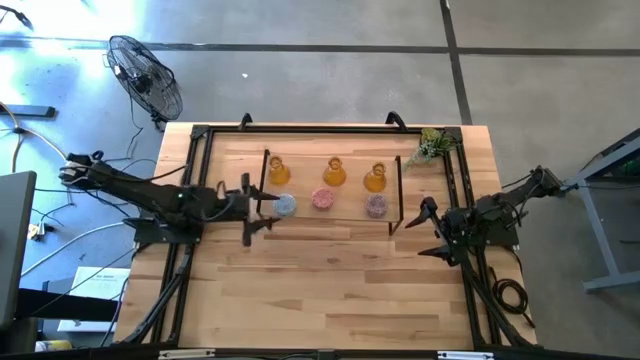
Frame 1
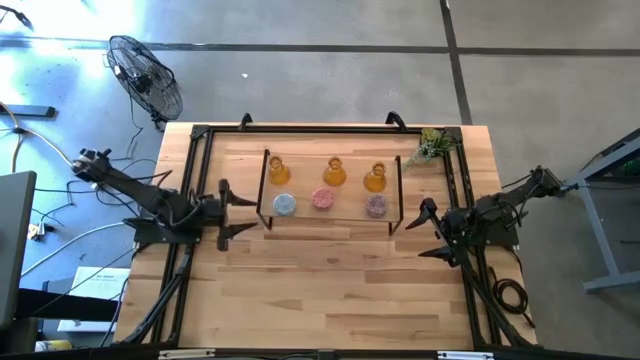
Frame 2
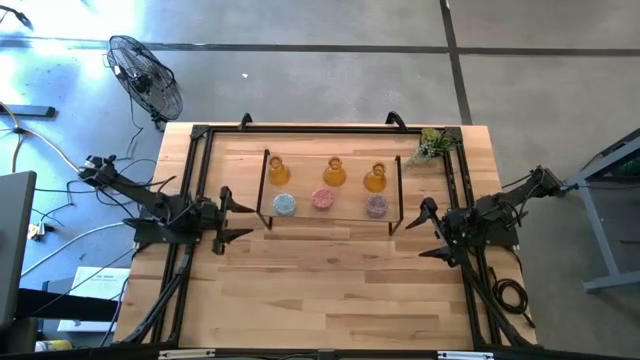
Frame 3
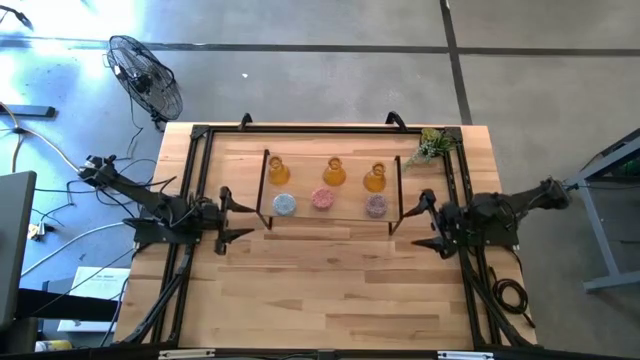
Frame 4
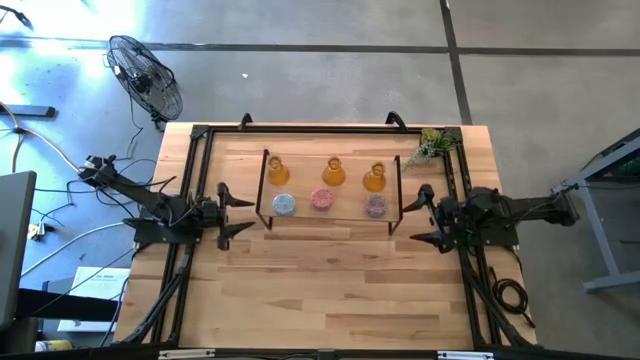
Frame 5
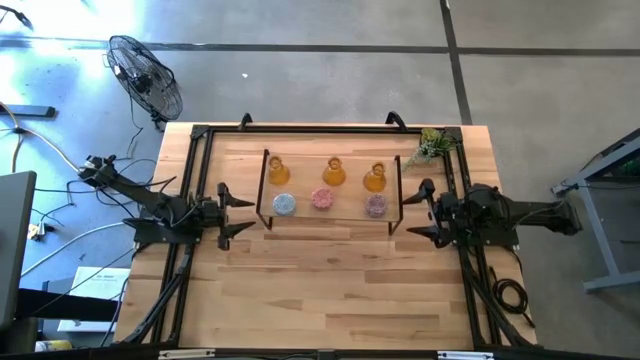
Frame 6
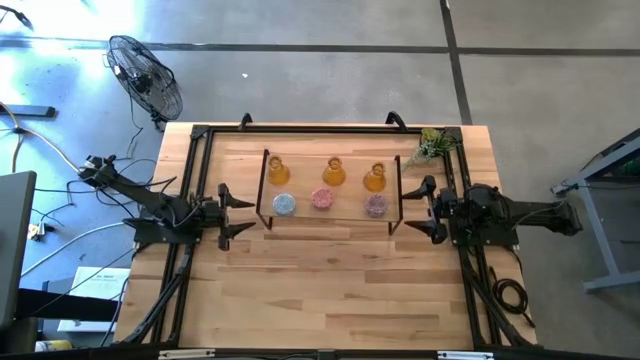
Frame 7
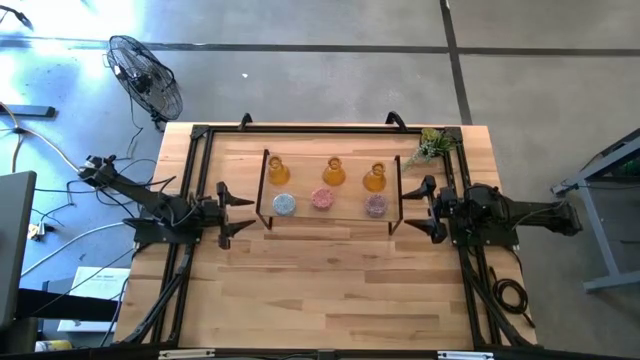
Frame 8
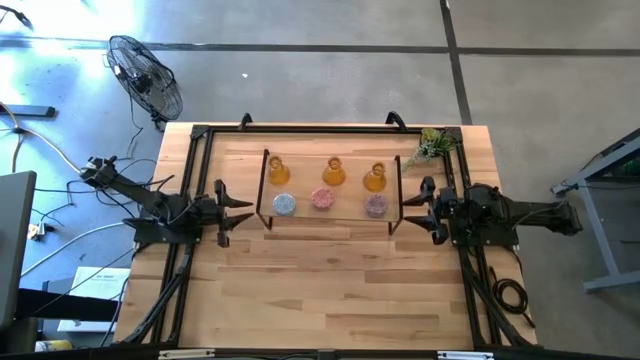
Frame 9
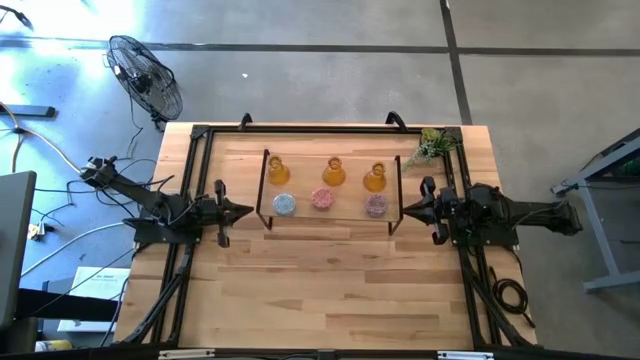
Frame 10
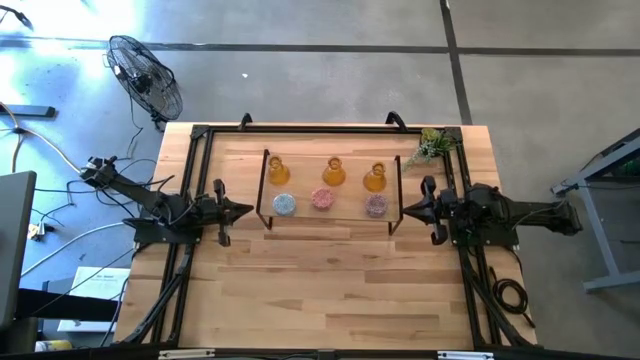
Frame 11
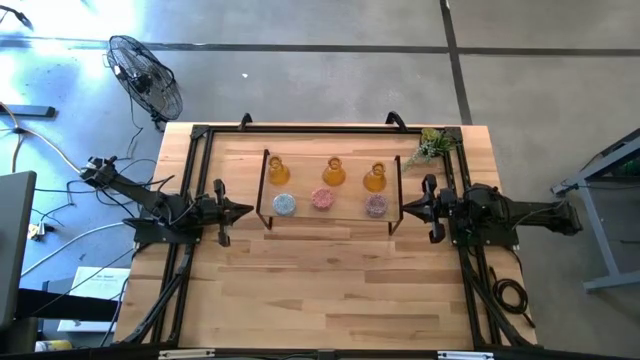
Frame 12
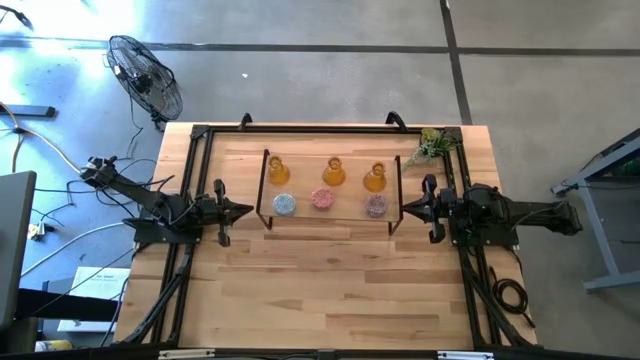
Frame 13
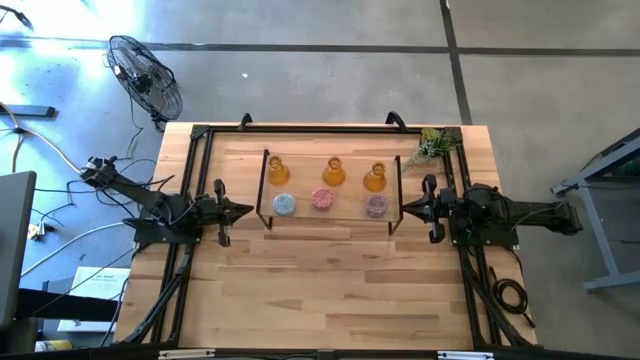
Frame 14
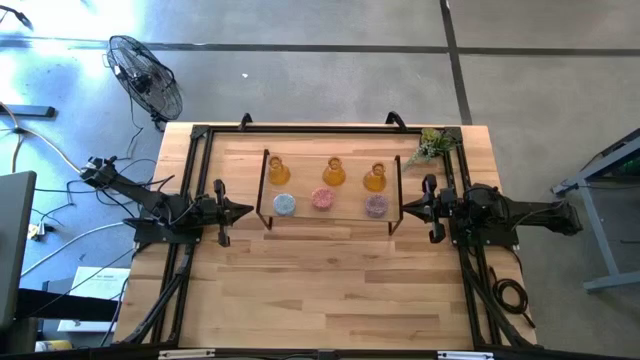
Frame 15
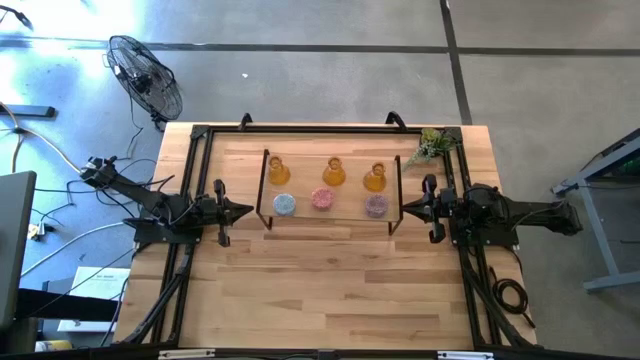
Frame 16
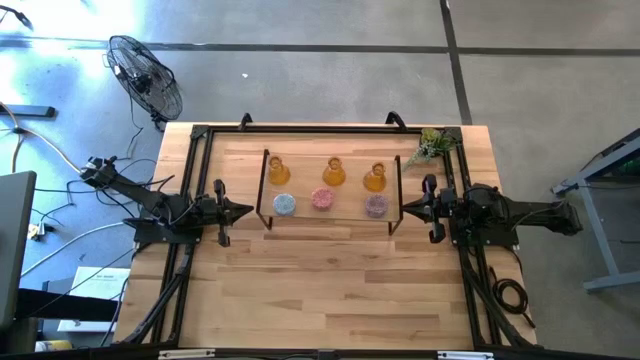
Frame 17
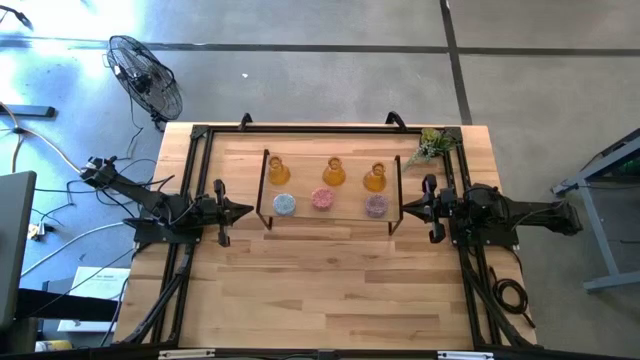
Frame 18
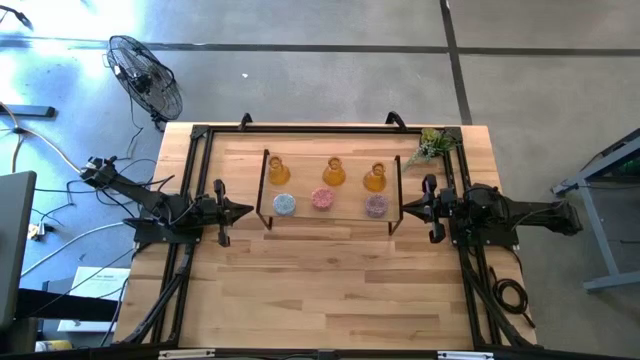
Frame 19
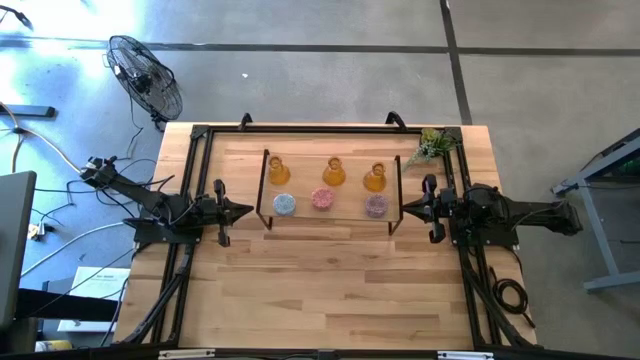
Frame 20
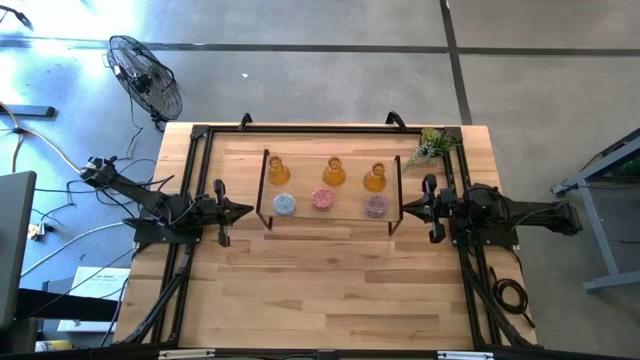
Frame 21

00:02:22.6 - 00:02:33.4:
Task: Pick & Place candle stick holders
Return to Home Position

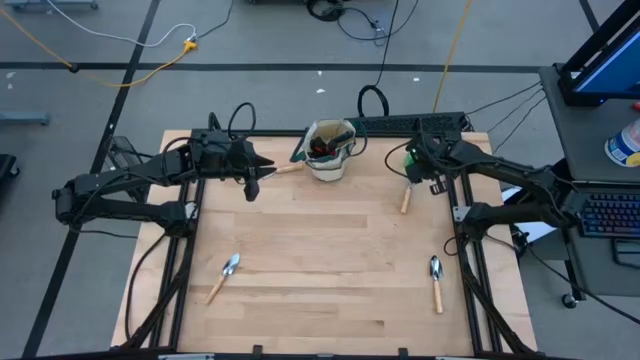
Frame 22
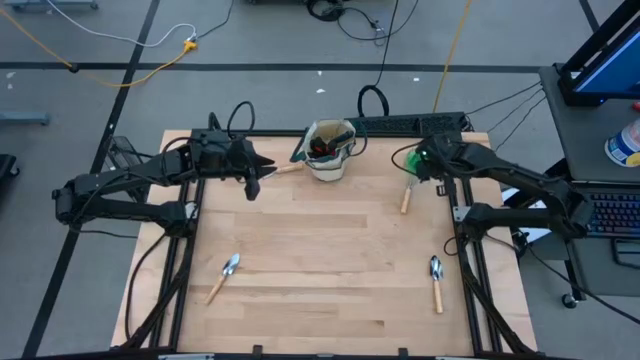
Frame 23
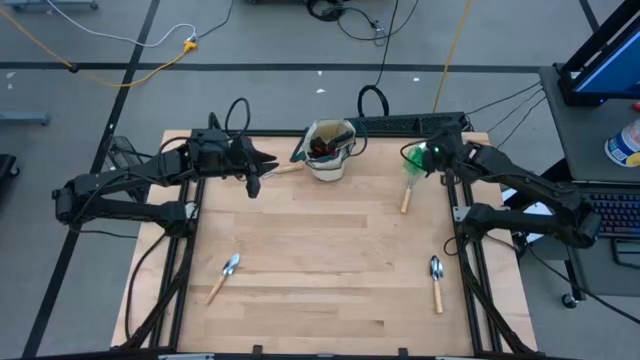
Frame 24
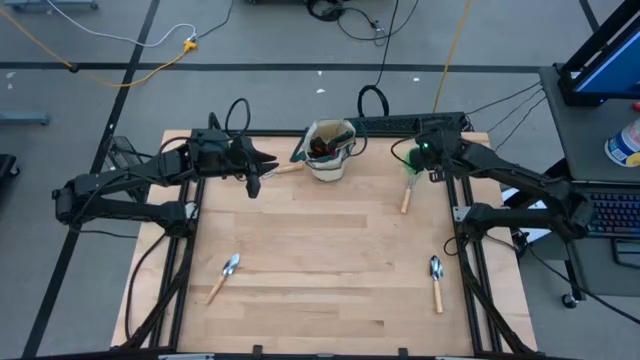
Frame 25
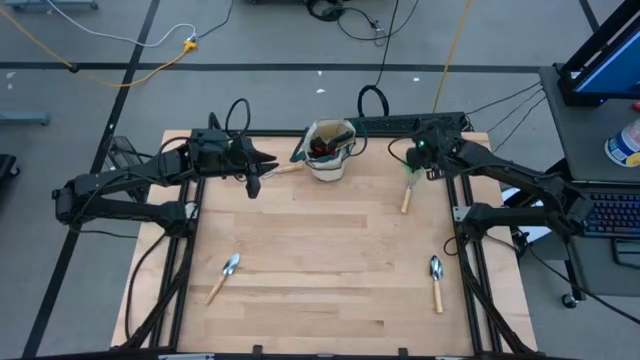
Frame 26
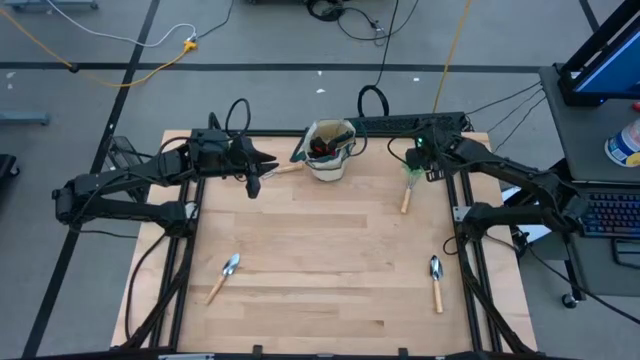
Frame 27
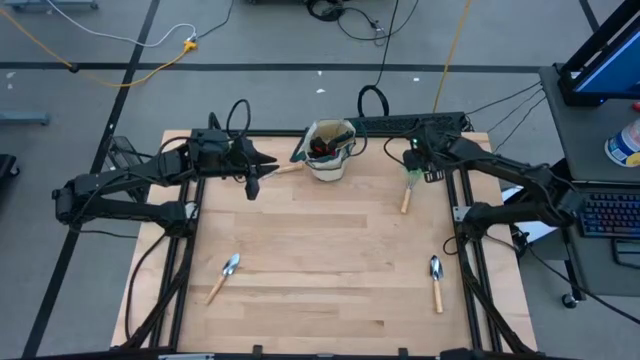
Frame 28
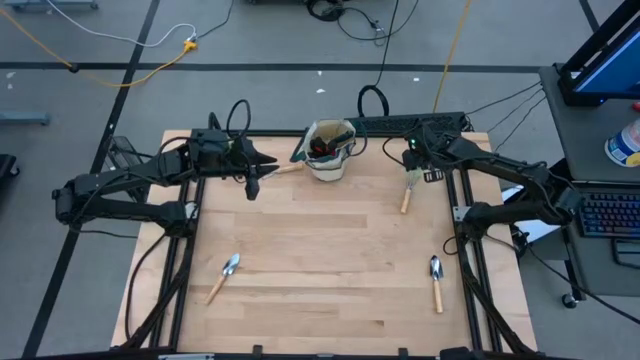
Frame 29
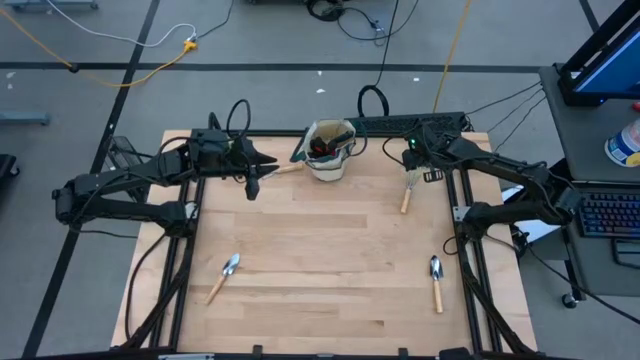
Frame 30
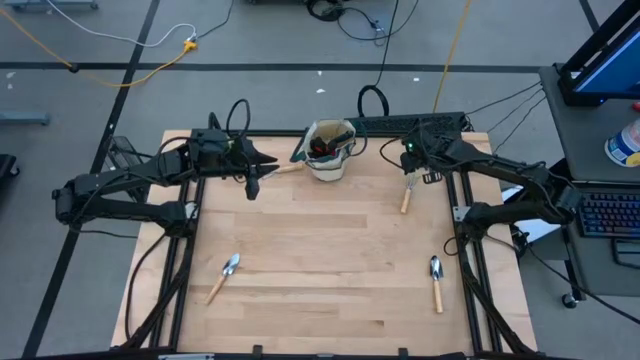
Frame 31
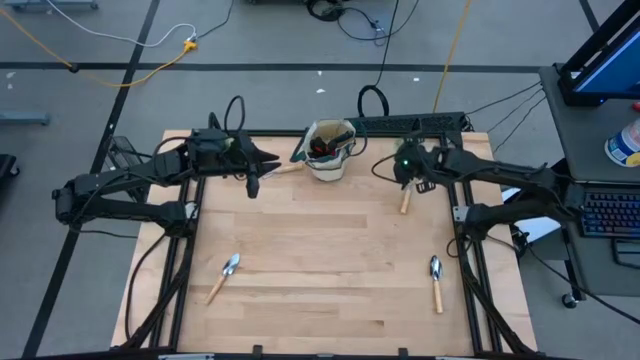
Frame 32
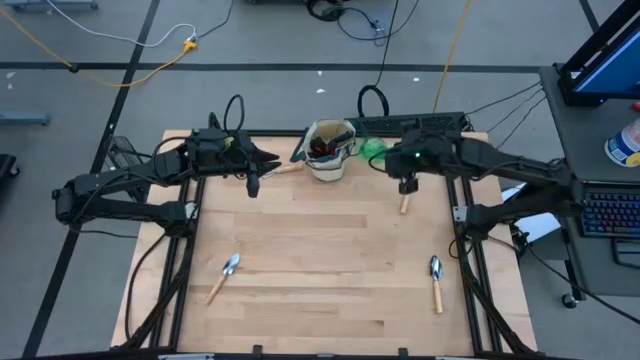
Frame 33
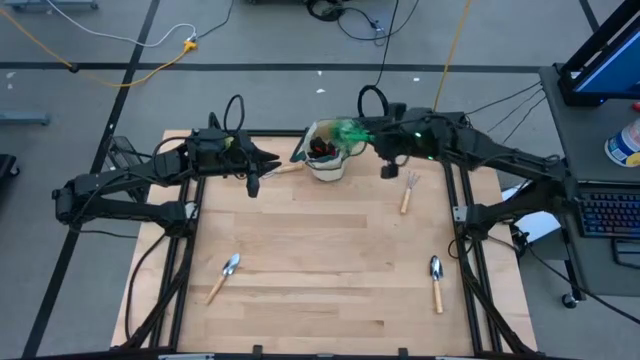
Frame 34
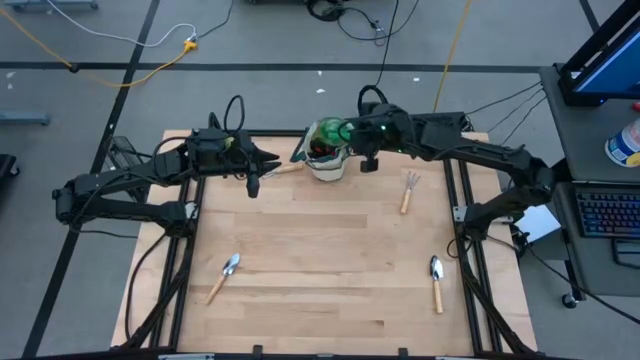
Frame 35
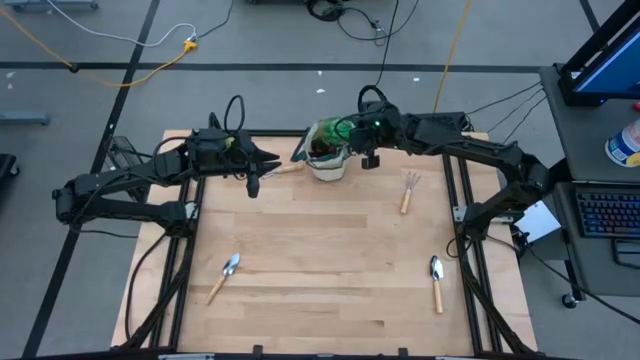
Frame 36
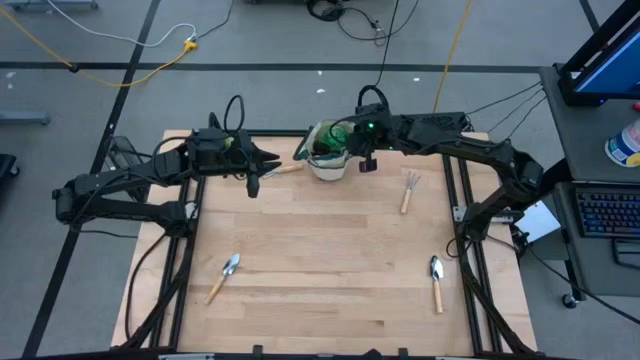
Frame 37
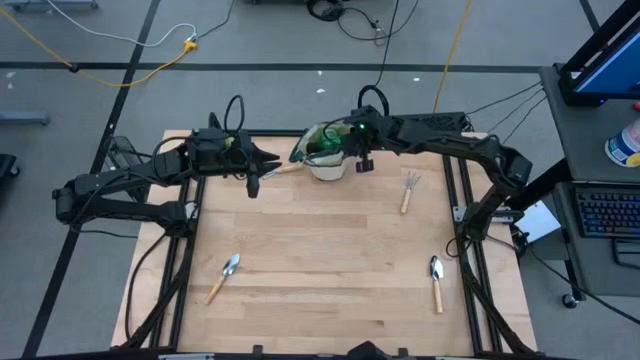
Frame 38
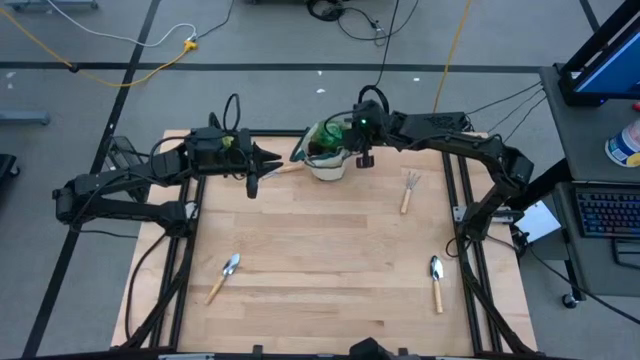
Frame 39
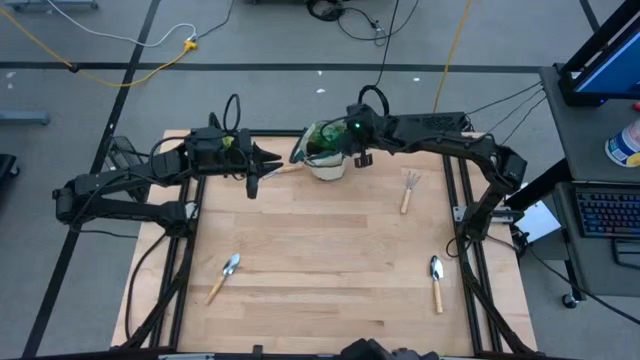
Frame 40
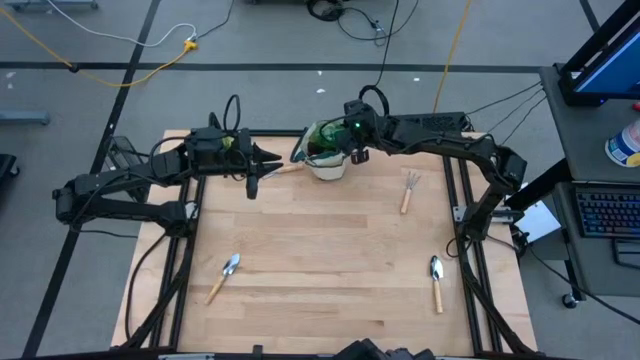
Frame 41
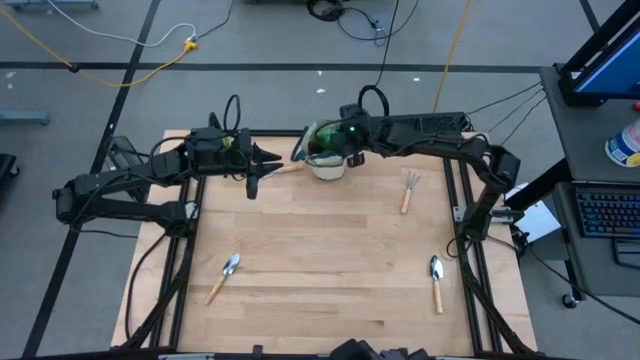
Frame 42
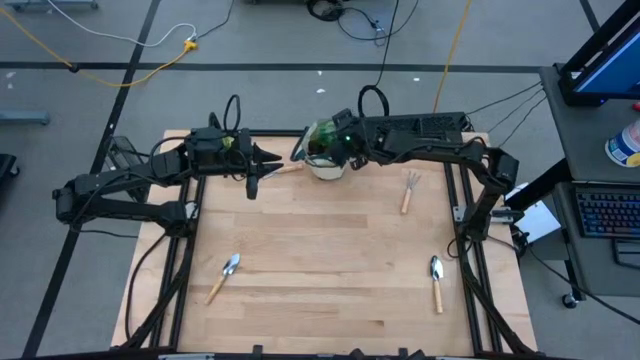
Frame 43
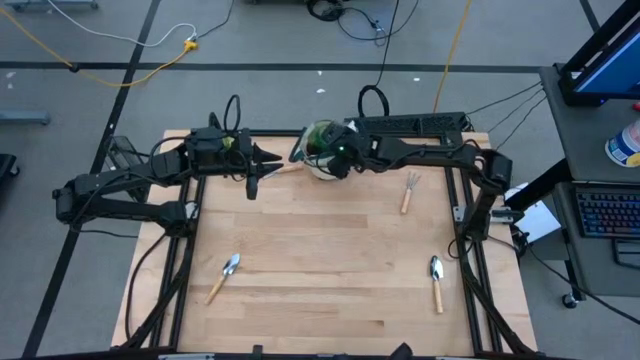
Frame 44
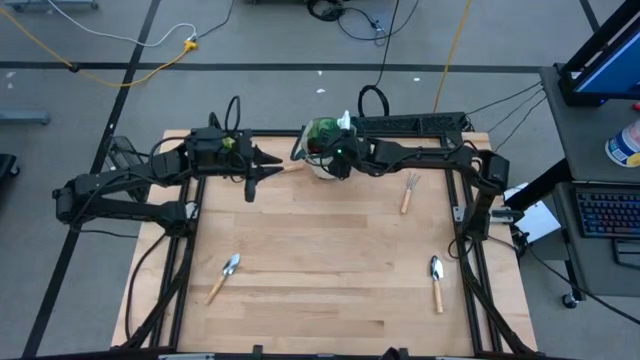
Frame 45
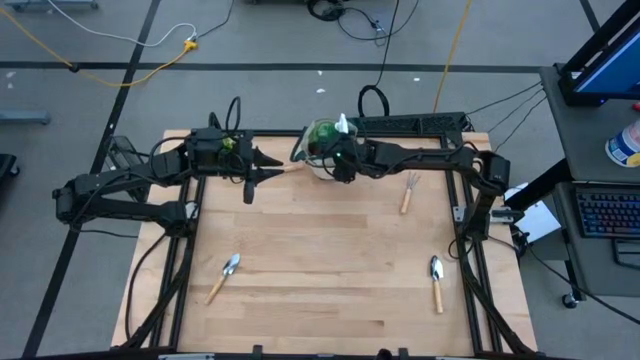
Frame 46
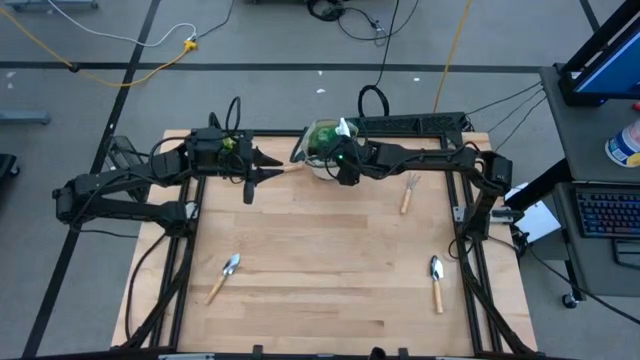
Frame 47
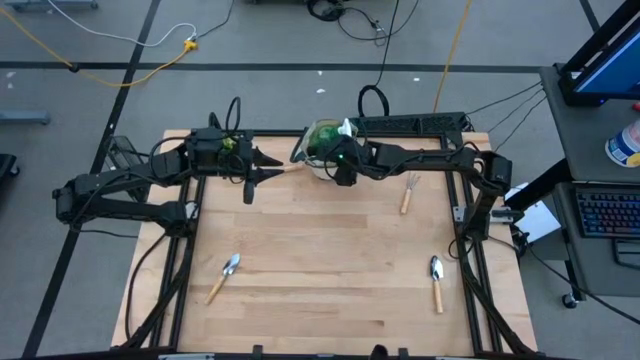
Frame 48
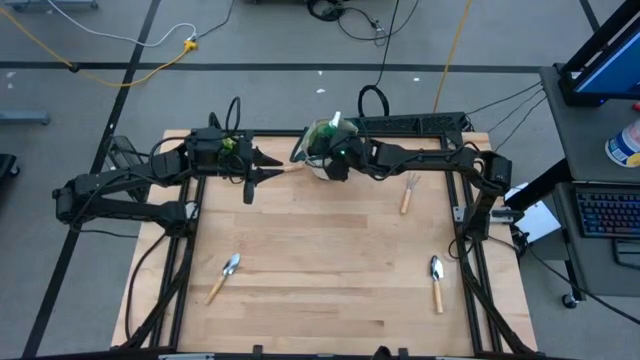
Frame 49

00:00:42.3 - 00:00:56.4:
Task: Pick & Place Garden tools in Gardening bag
Put the green spray bottle into the green gardening bag
